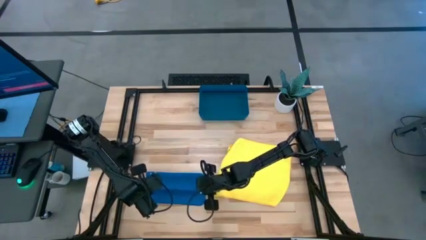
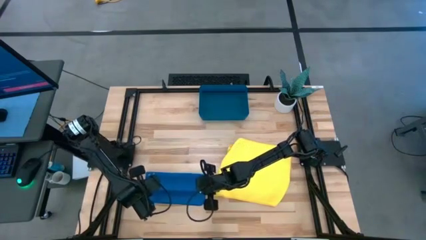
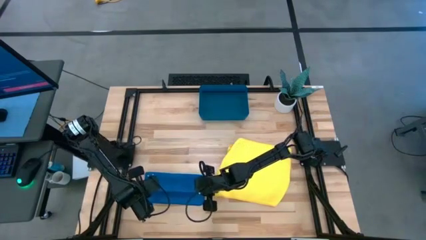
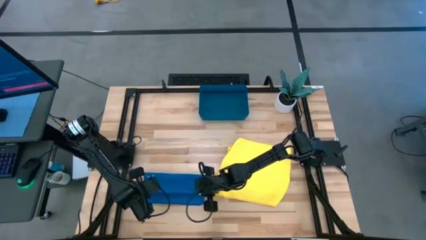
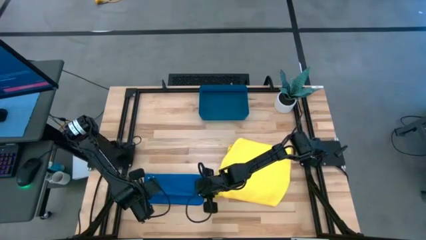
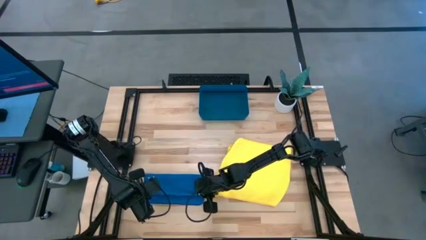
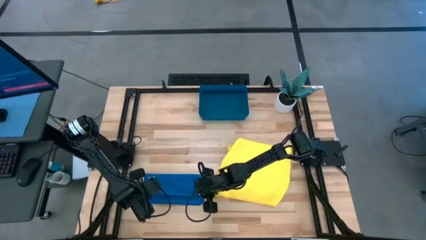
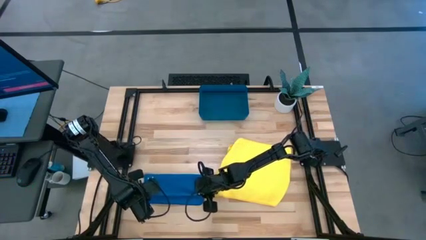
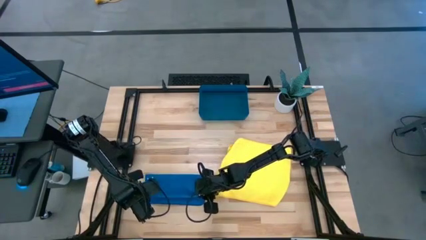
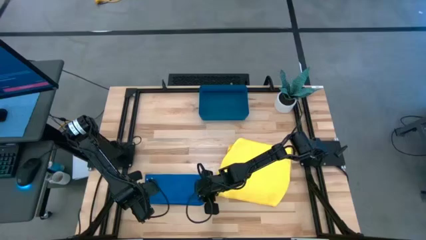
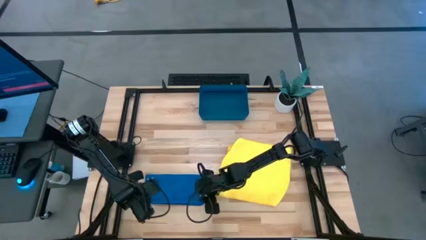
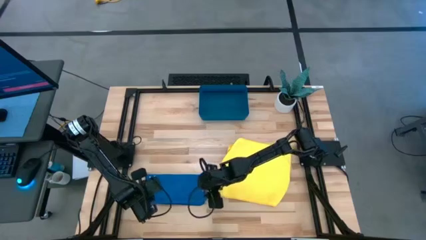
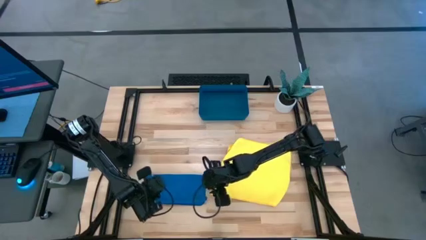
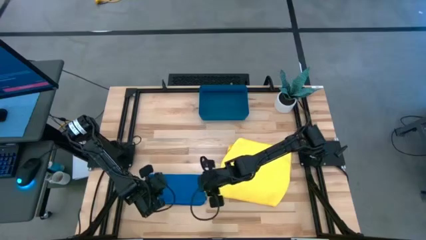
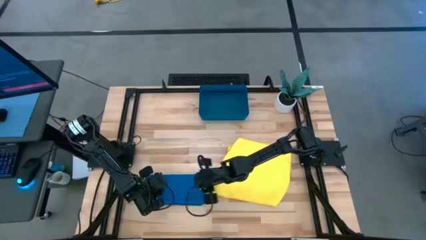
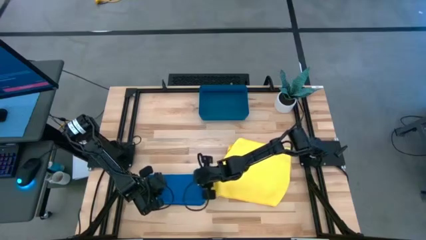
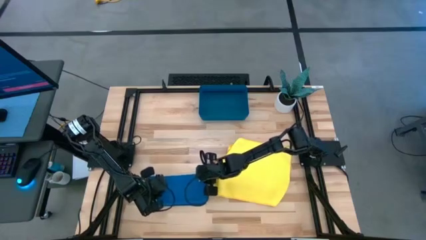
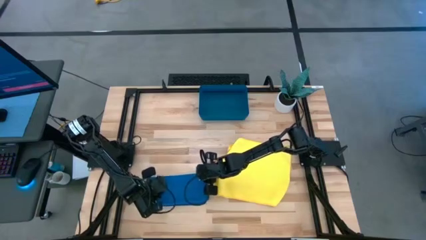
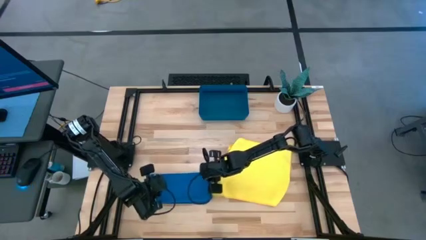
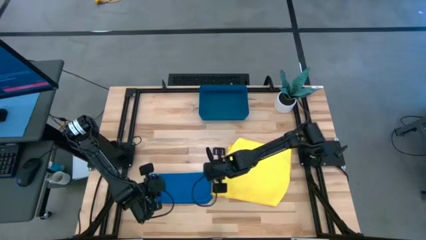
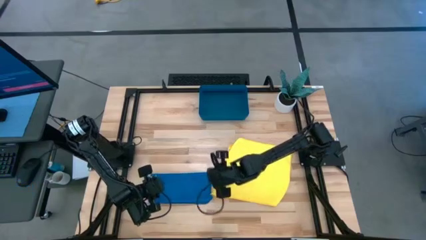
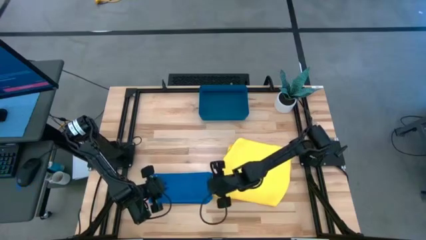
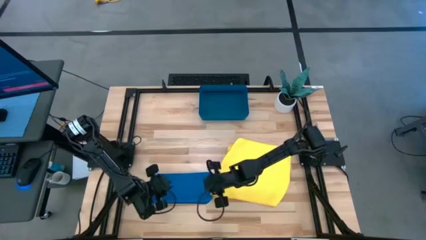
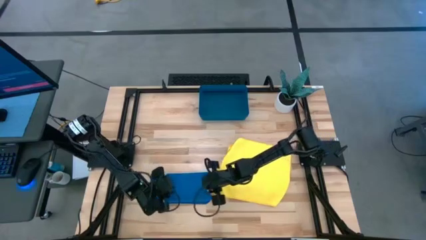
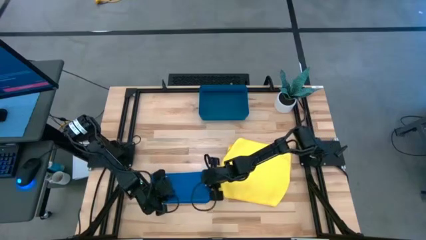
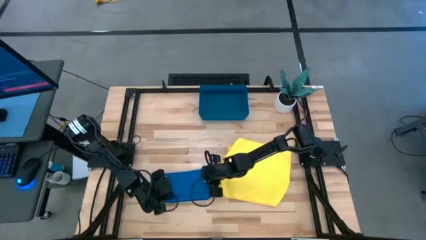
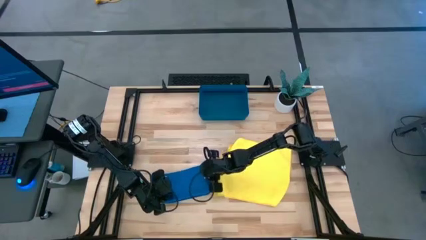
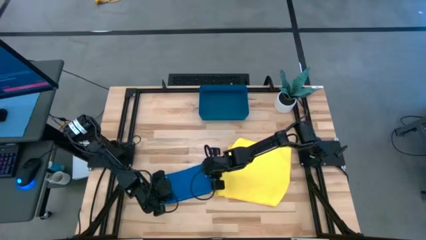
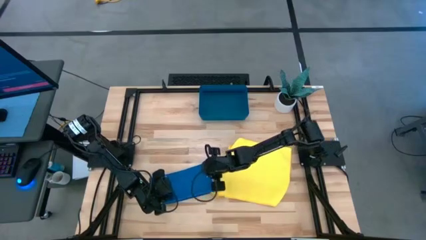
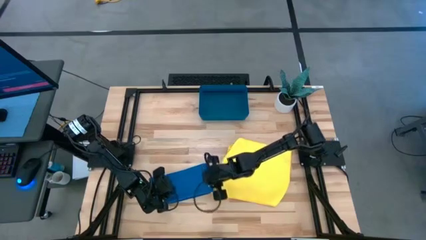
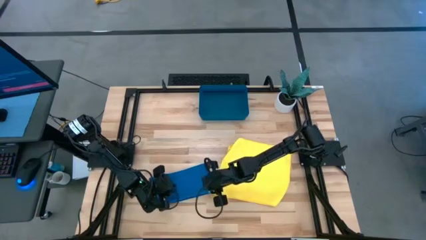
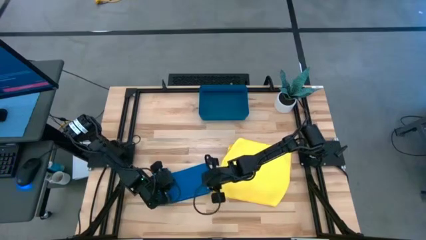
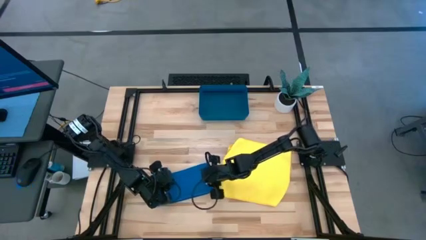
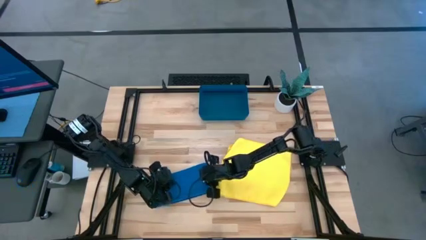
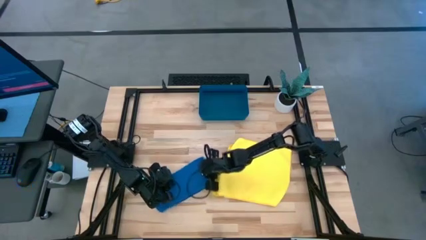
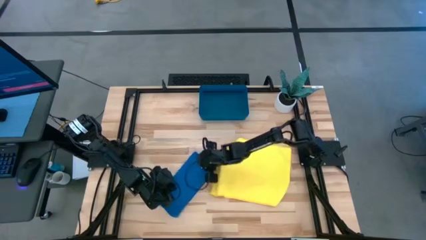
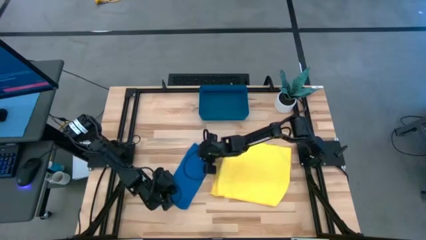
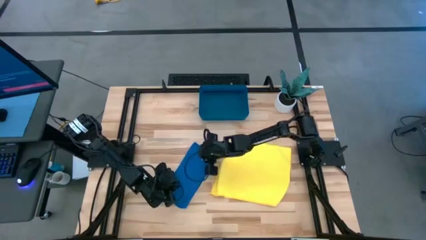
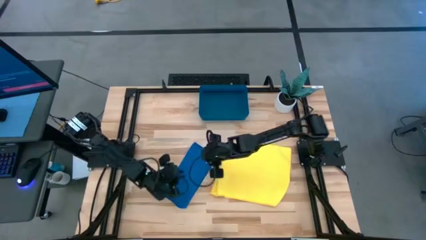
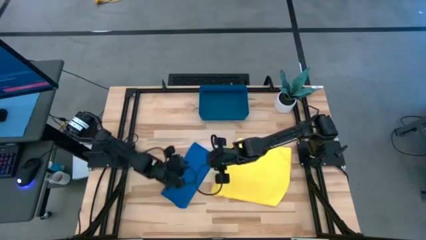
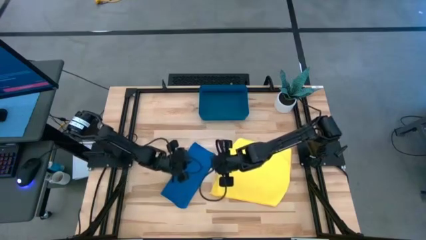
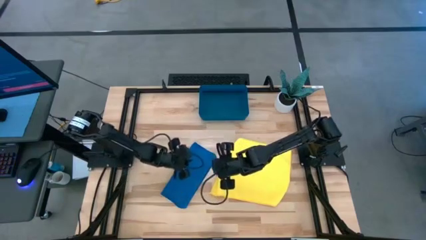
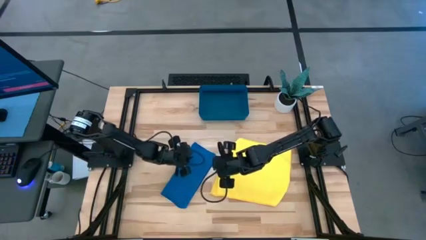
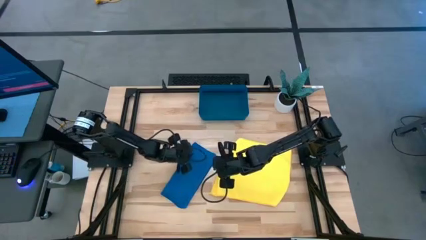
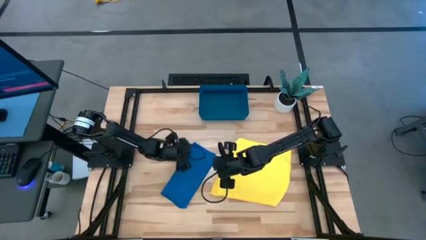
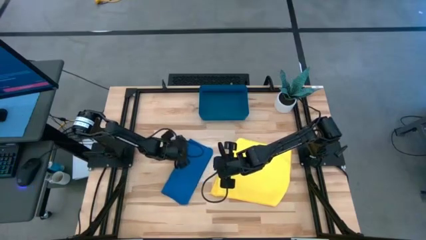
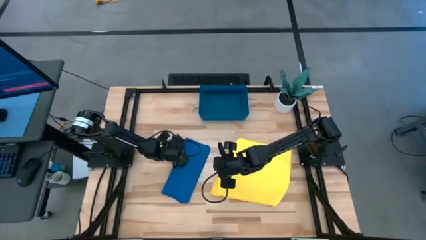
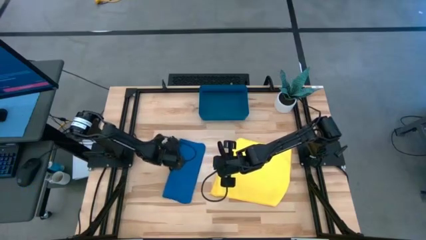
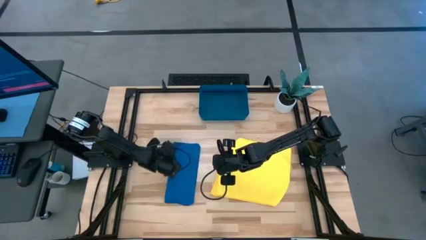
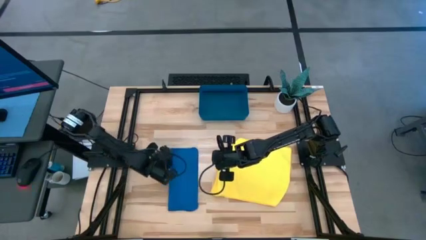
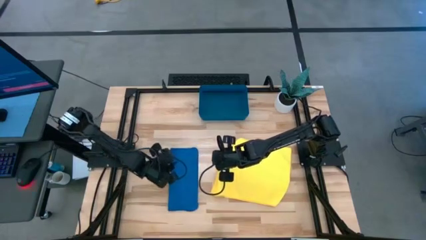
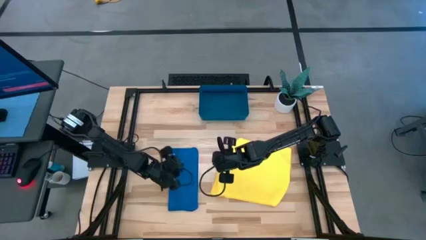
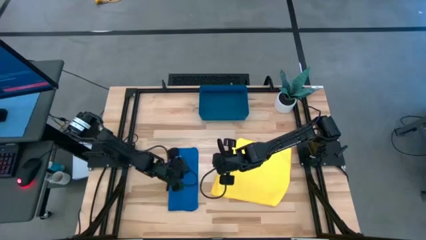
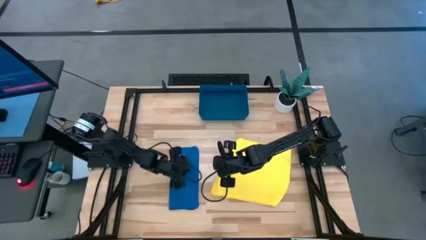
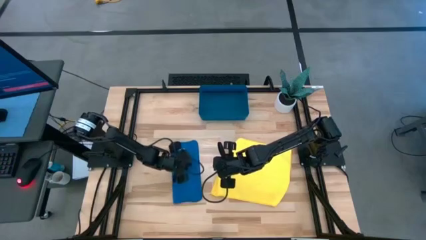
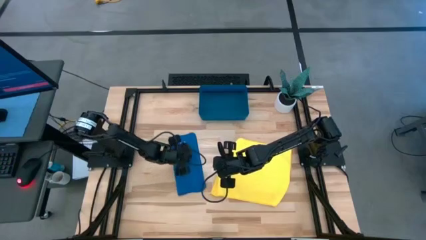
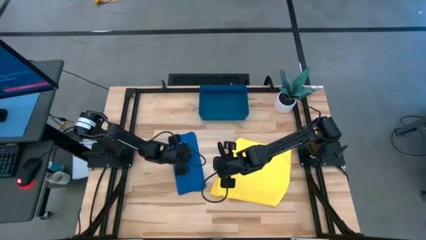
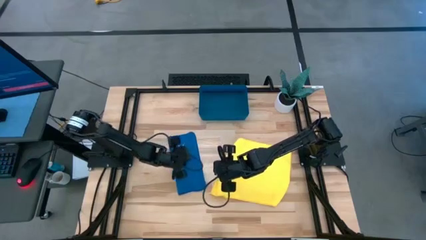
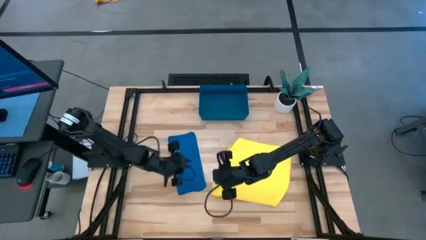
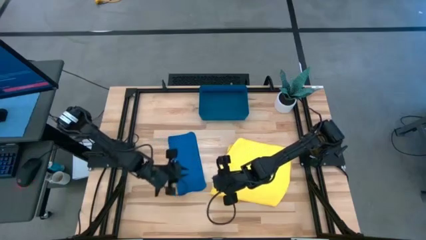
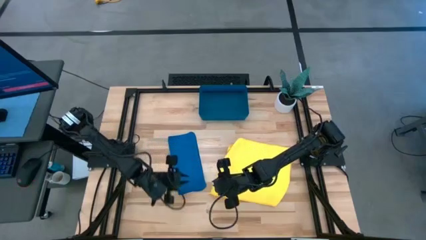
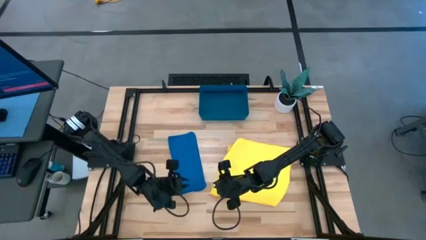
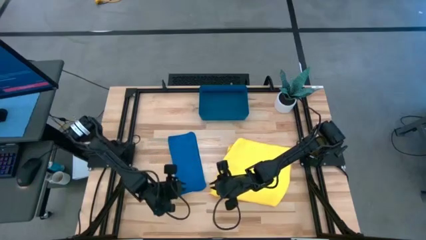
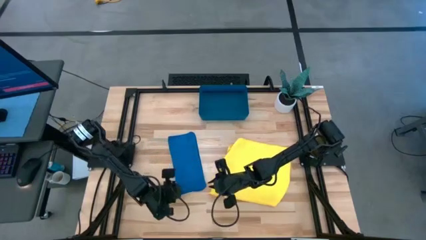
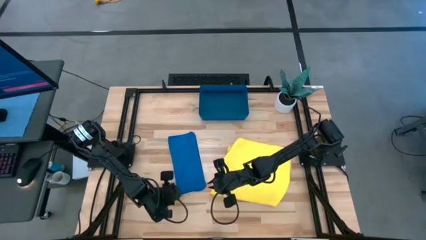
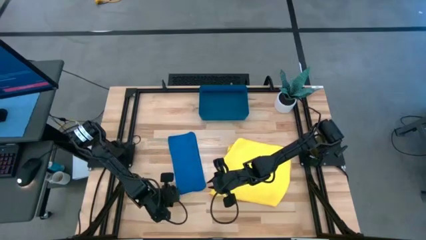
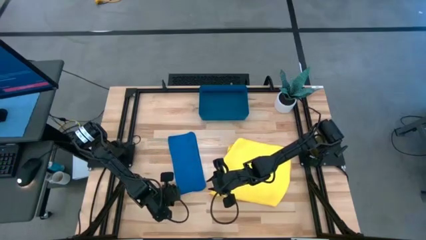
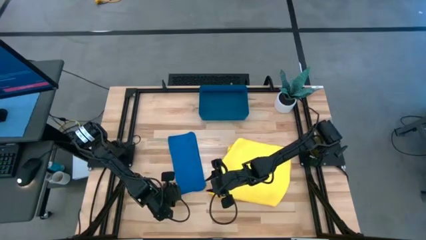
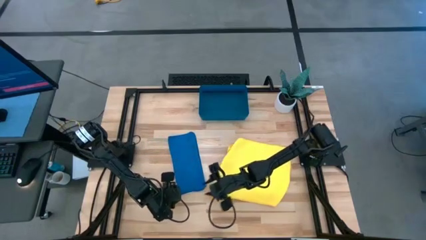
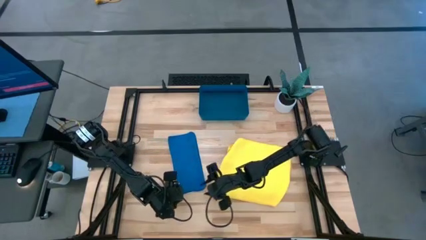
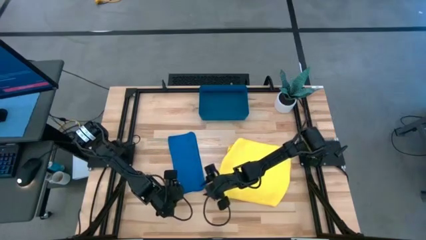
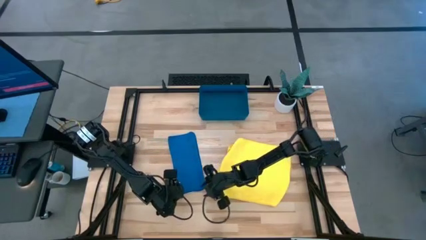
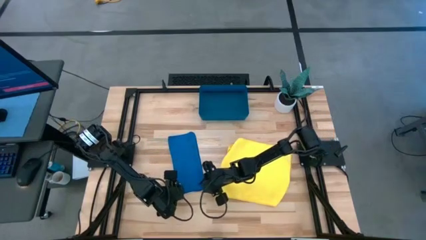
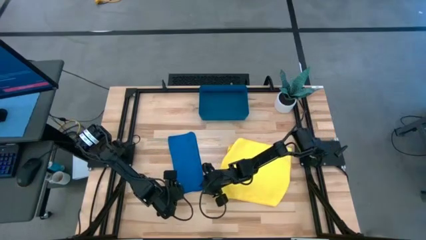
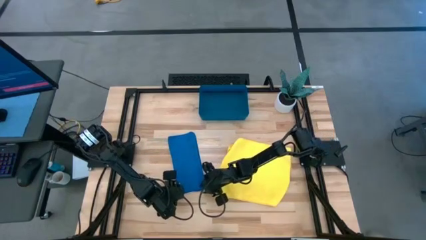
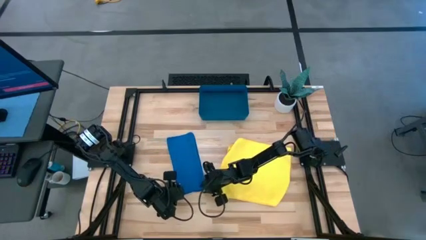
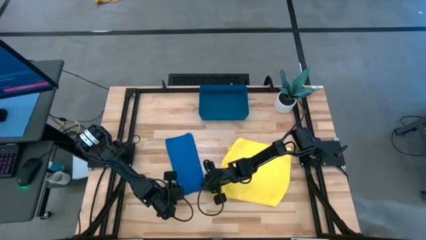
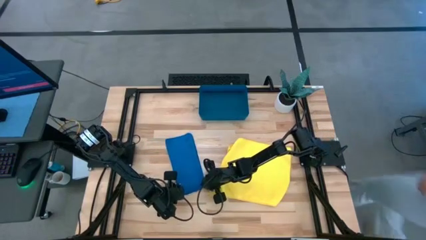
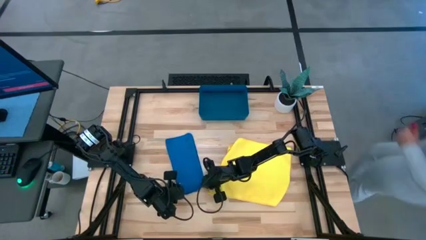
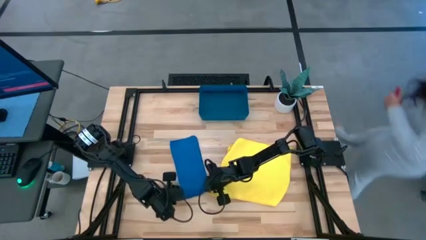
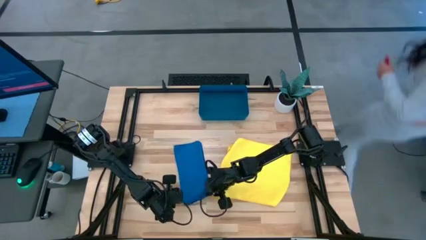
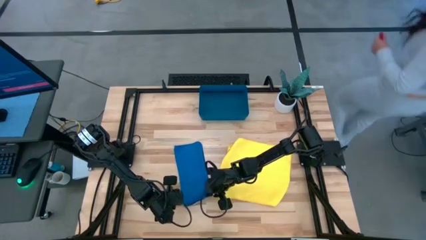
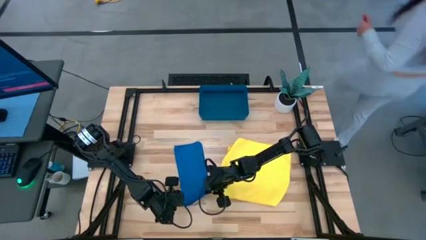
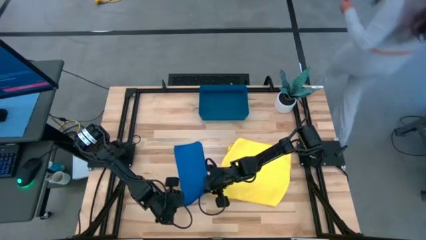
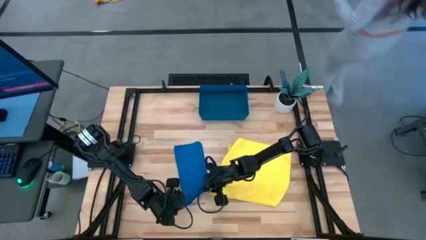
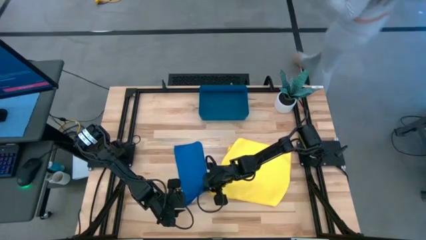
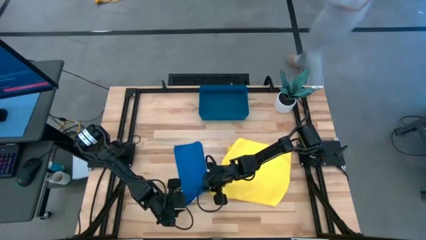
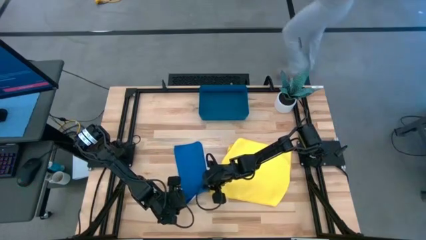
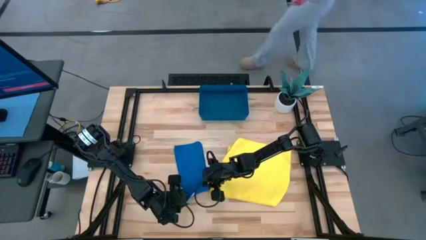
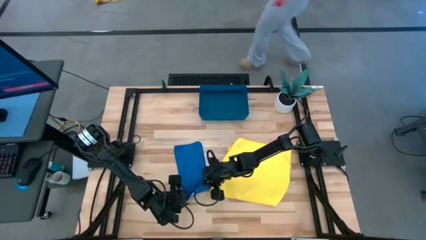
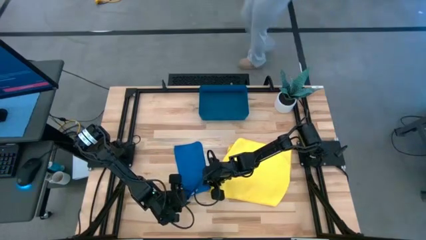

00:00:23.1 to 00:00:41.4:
Task: Roll microfiber towels into tight, uniform cylinder then place into a basket
Roll the blue microfiber cloth
